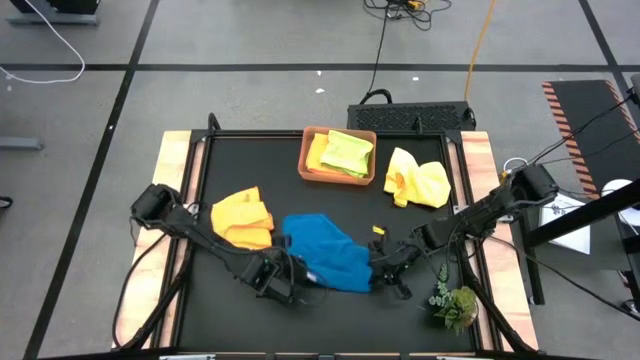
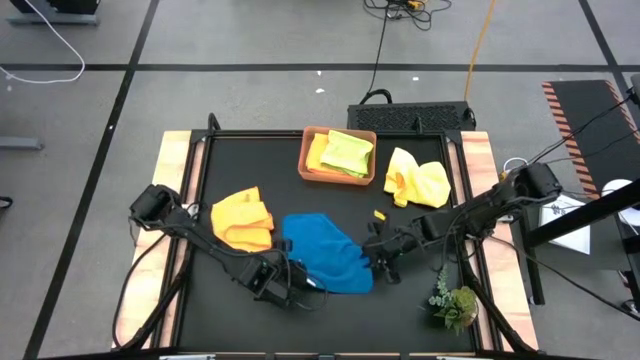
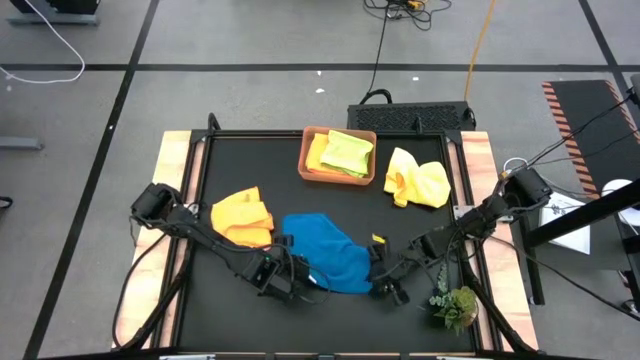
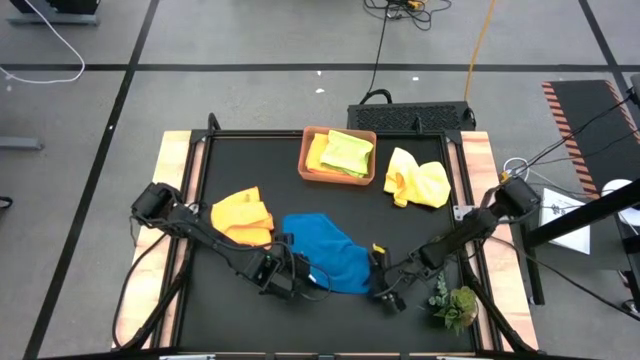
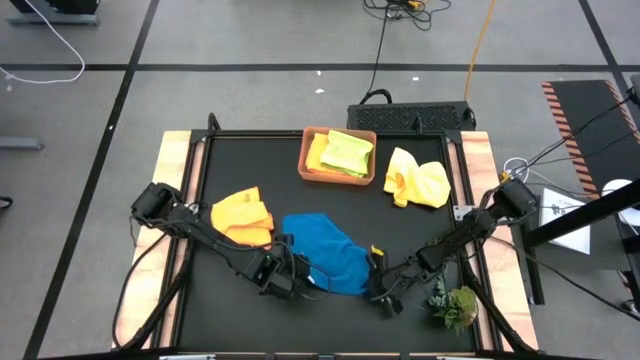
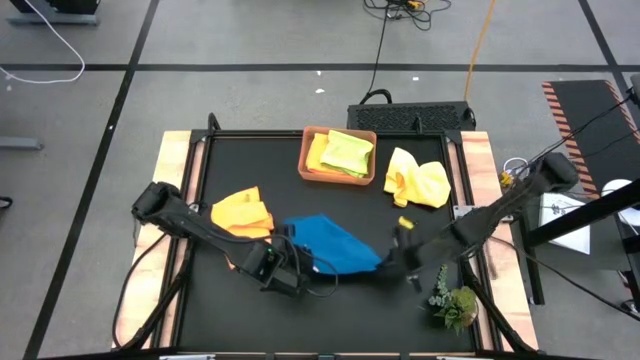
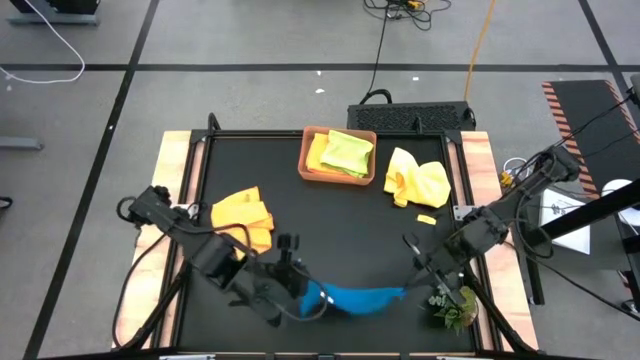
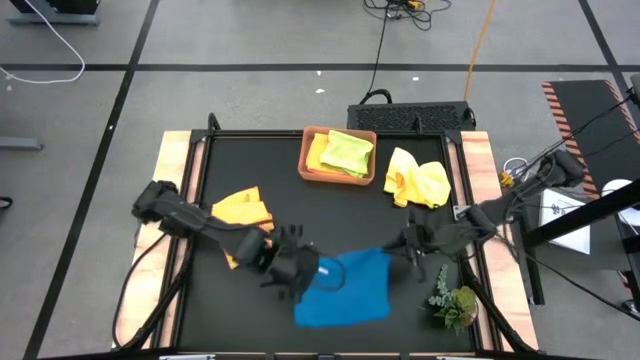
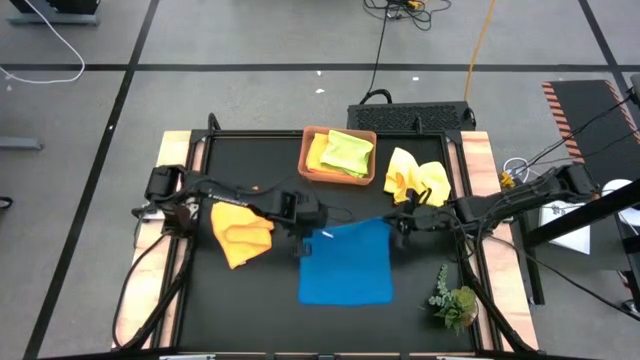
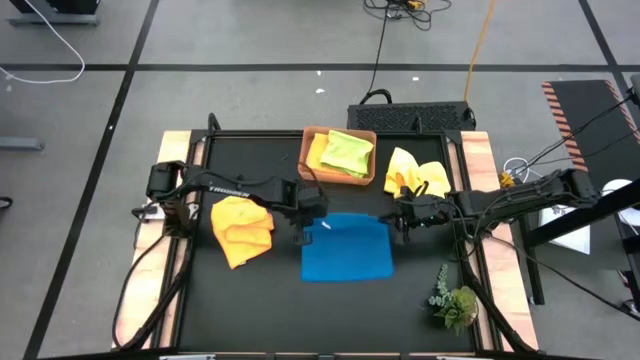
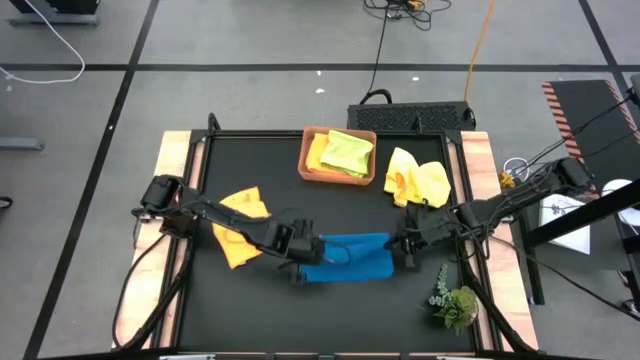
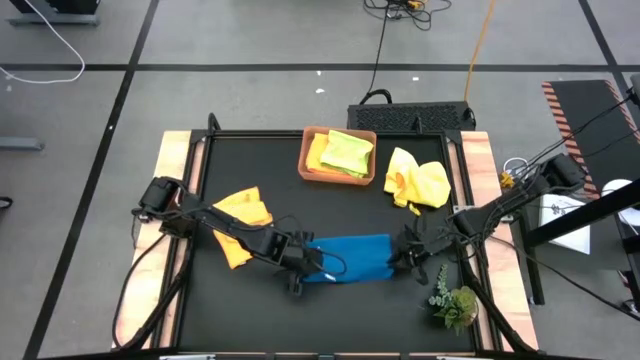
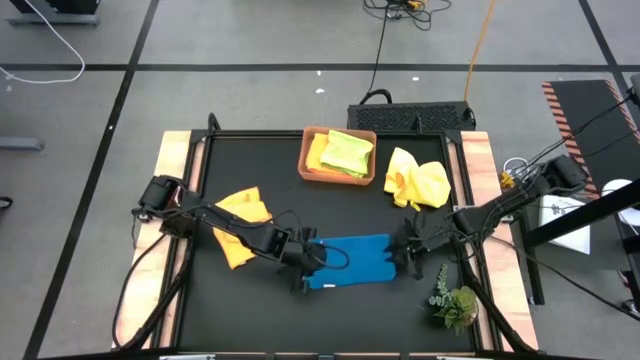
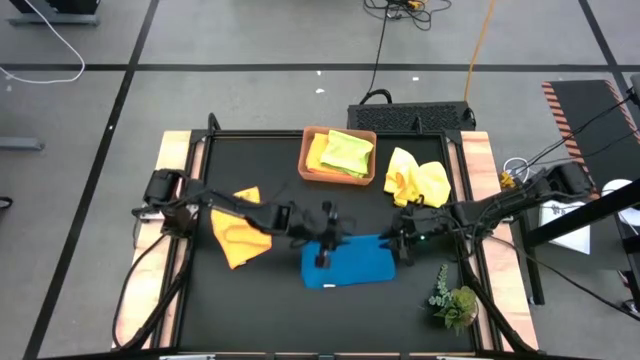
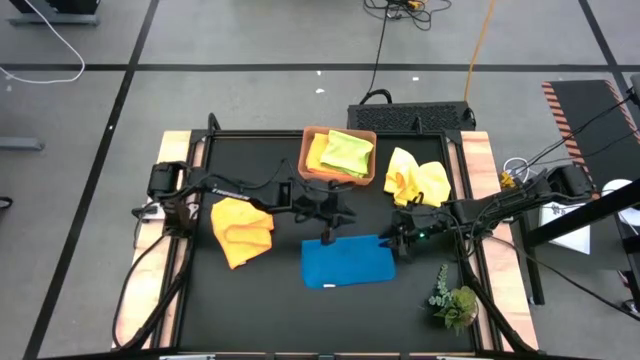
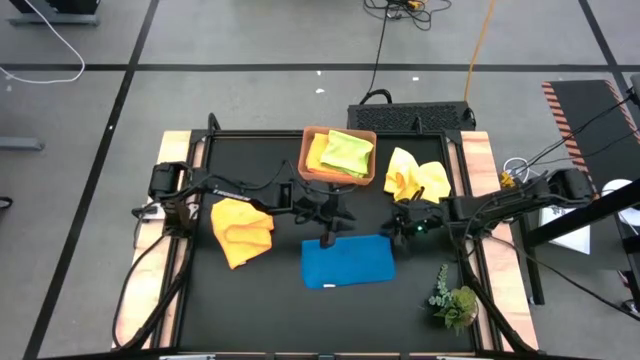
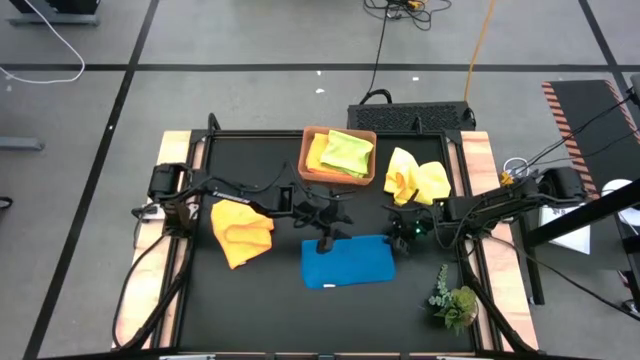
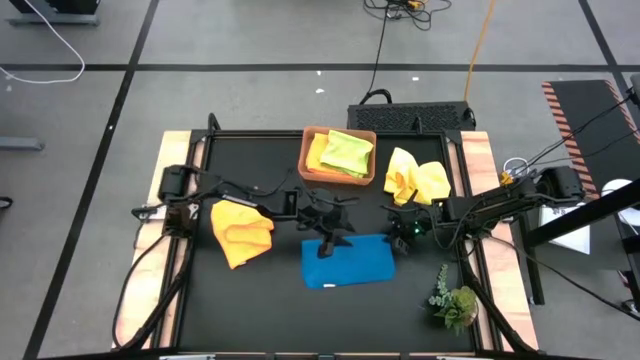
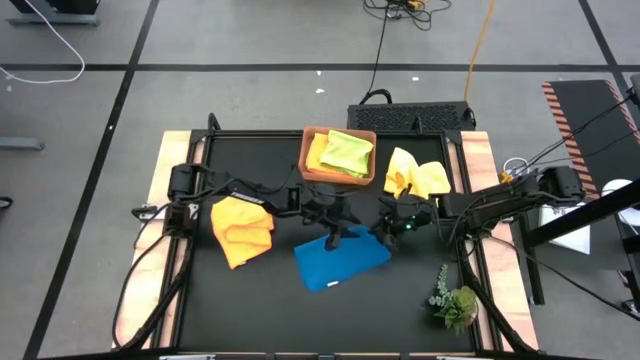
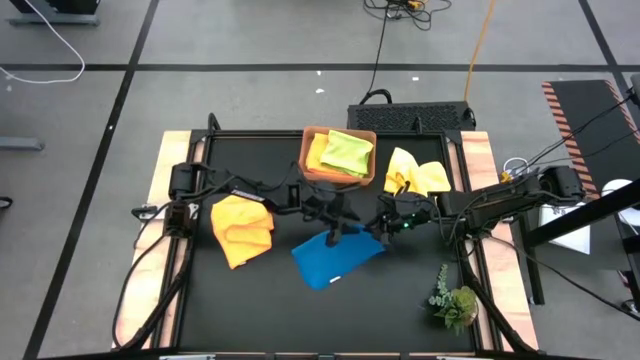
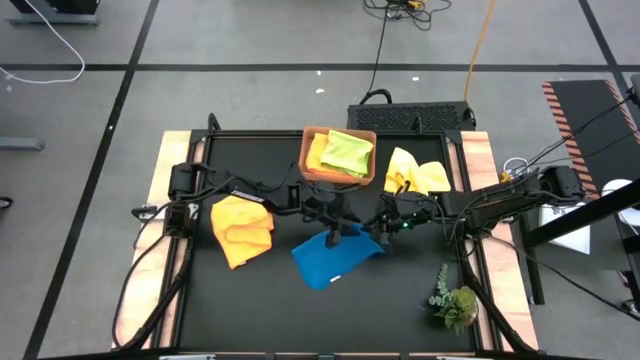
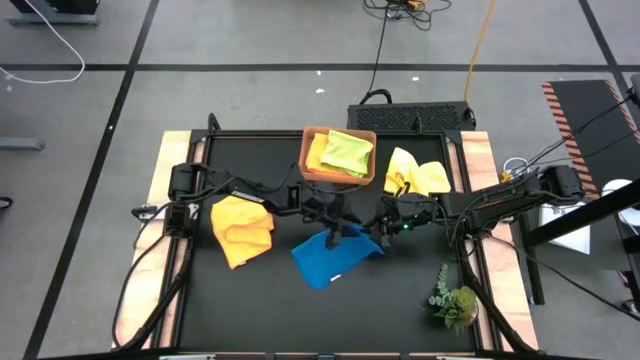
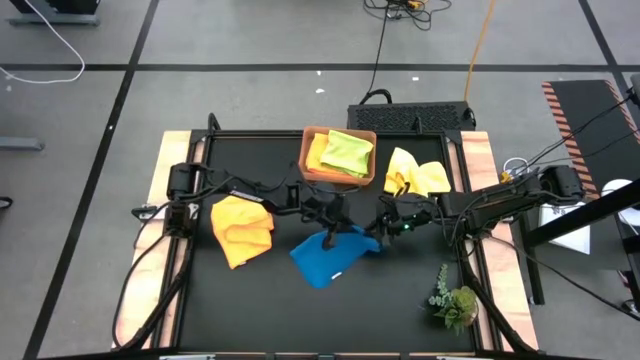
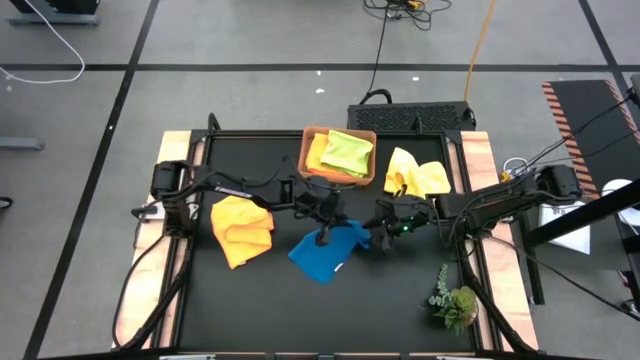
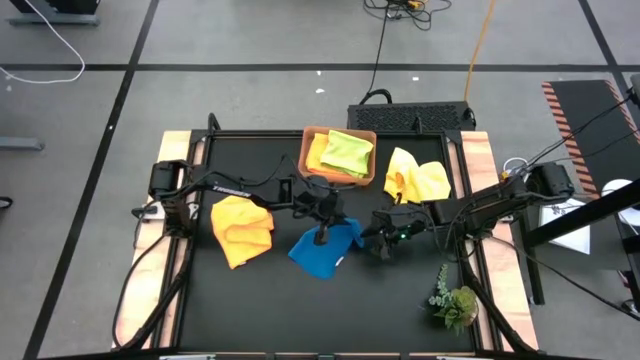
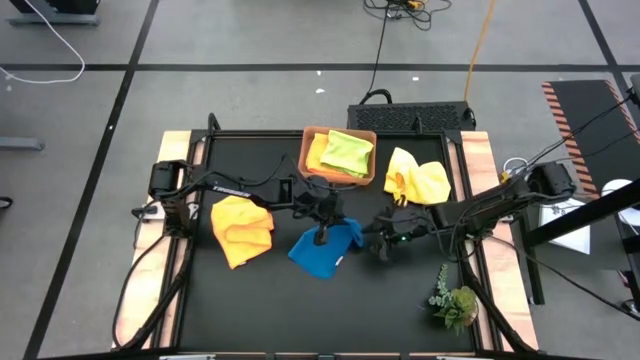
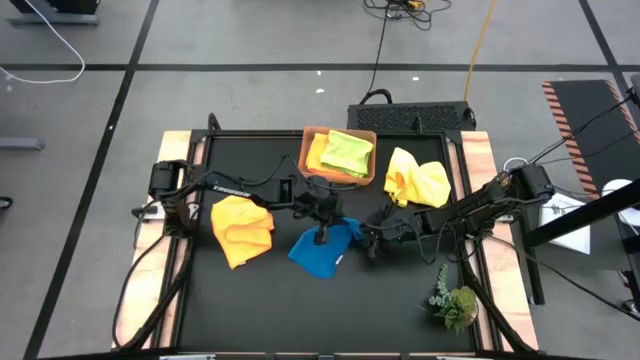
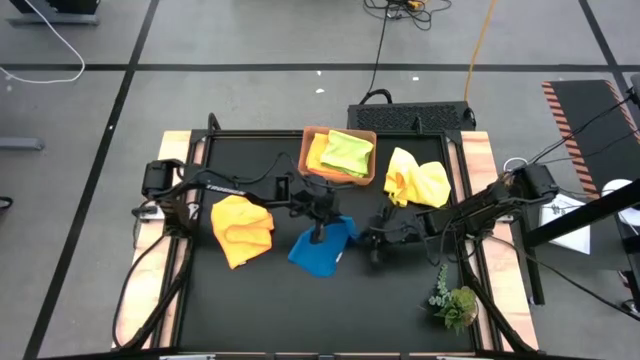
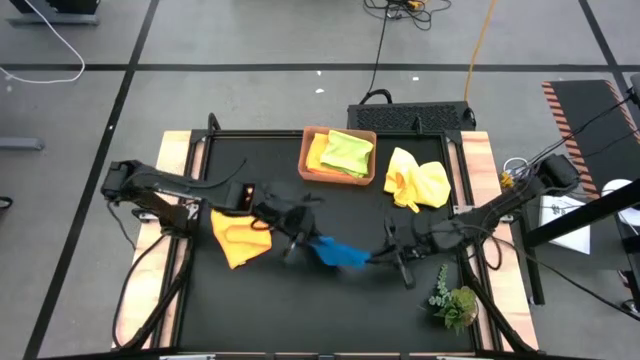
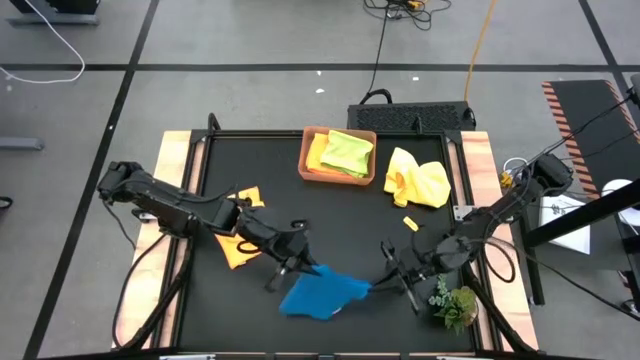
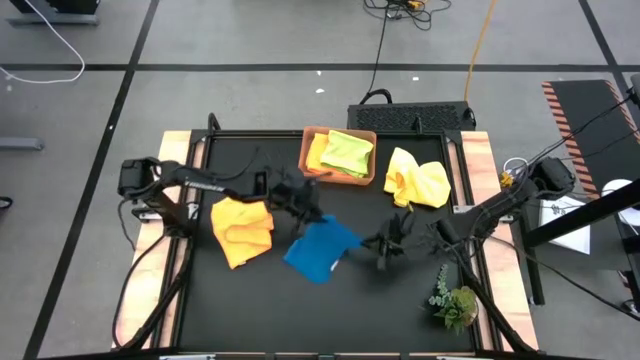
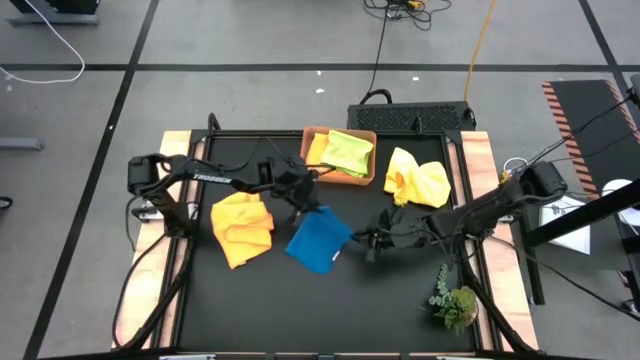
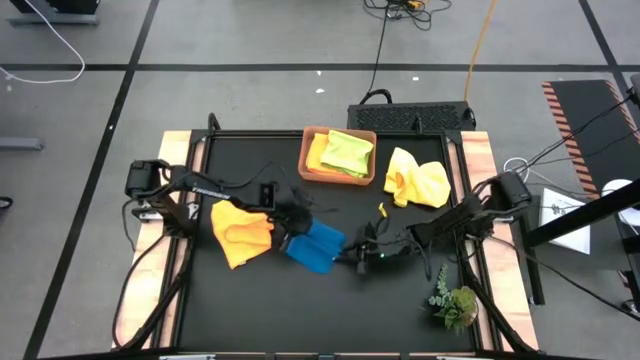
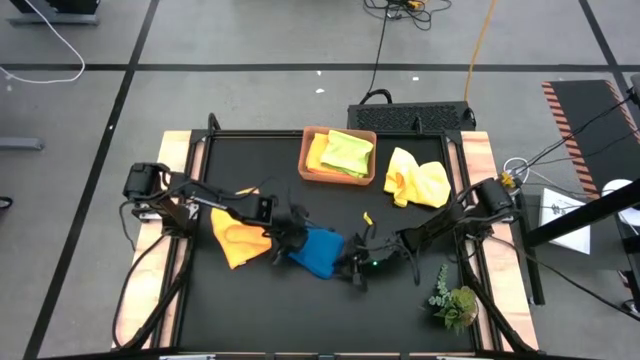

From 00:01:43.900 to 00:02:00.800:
Task: Fold microfiber towels
Fold the blue microfiber towel

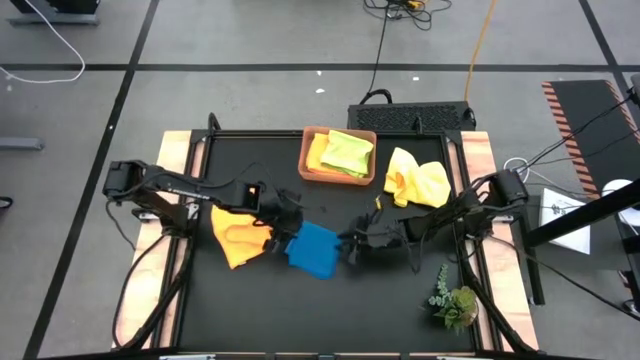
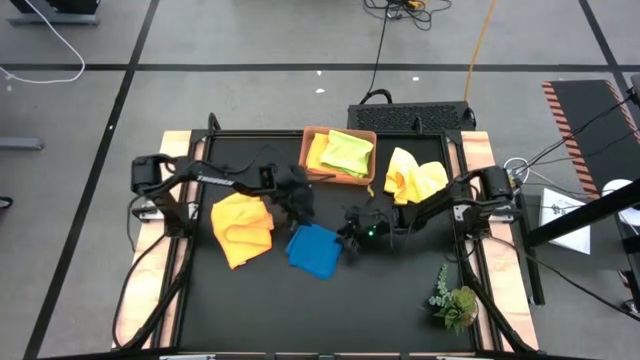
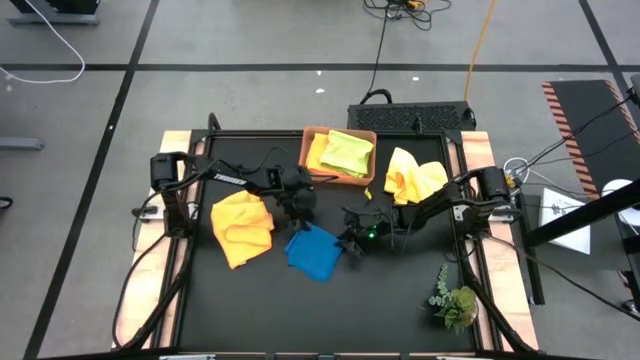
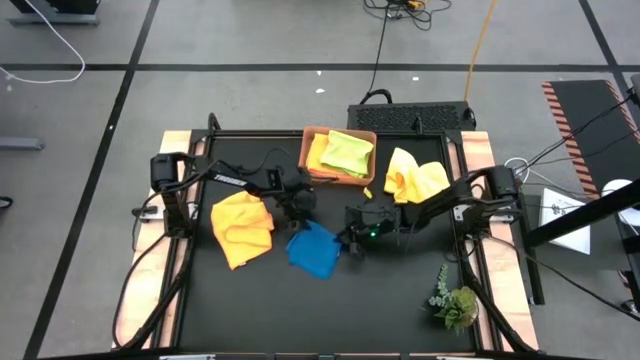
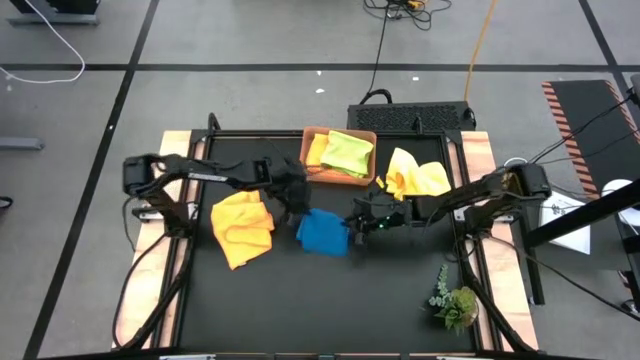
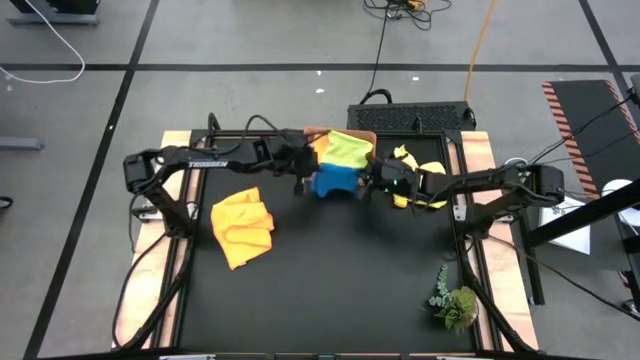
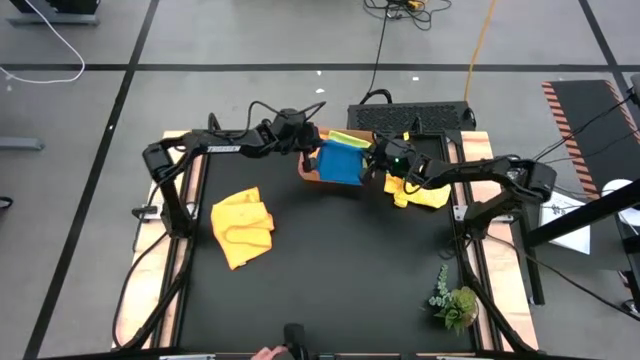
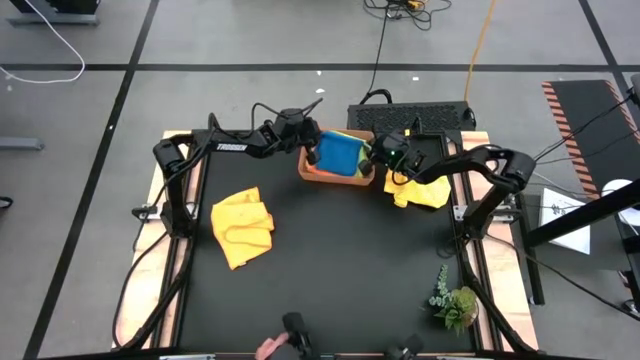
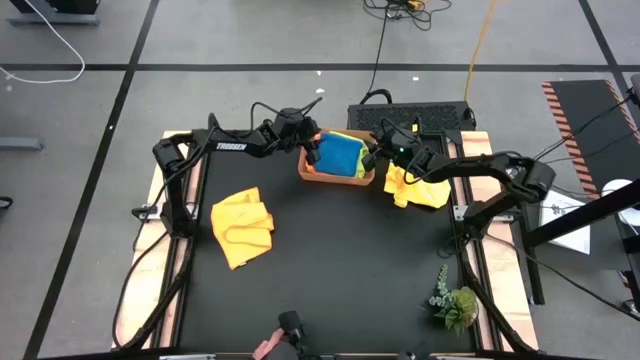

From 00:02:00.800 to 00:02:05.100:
Put the blue microfiber towel into the orange bin
